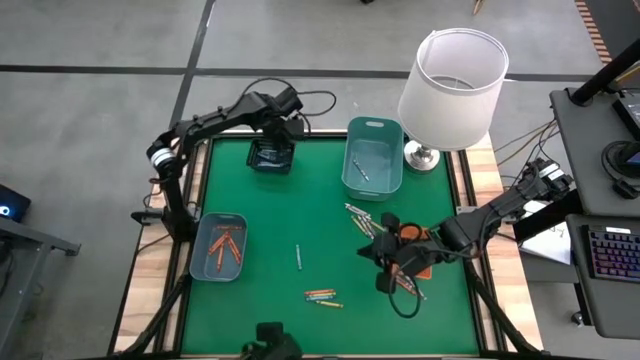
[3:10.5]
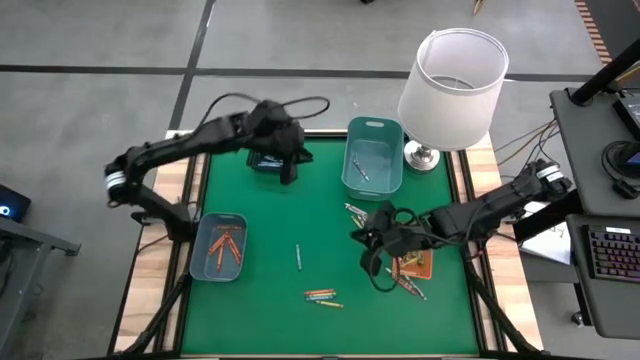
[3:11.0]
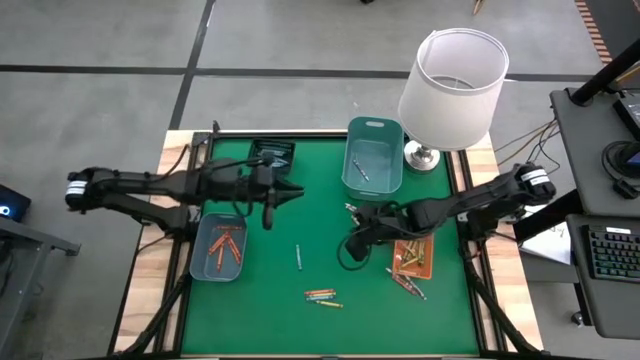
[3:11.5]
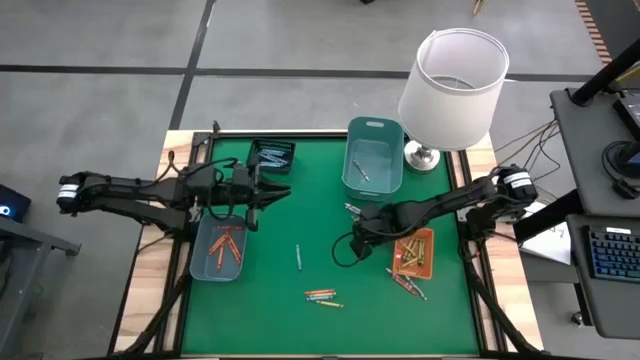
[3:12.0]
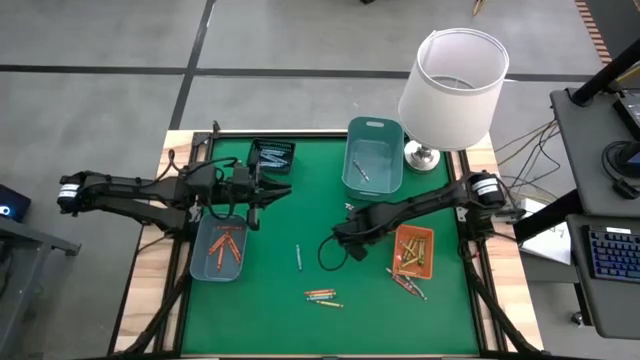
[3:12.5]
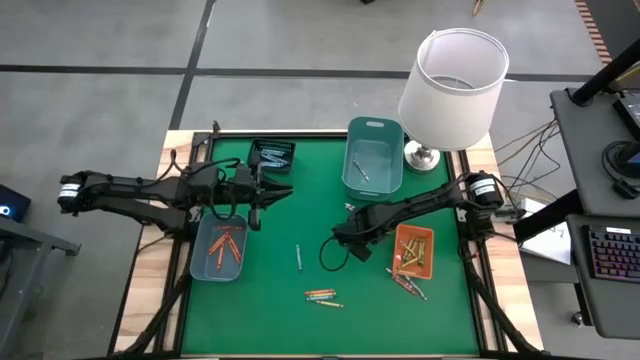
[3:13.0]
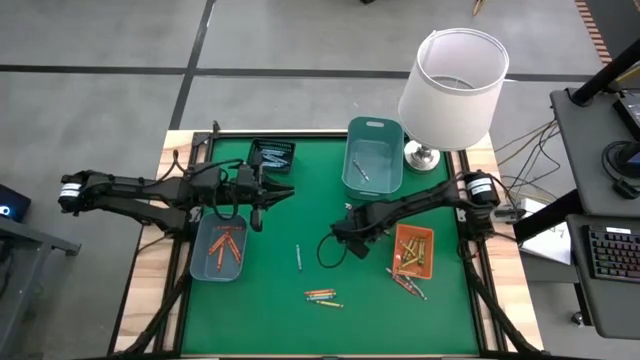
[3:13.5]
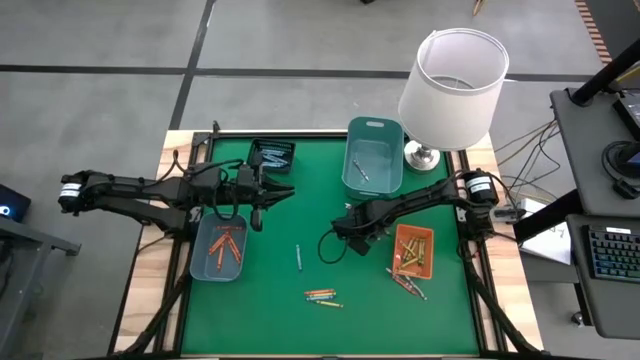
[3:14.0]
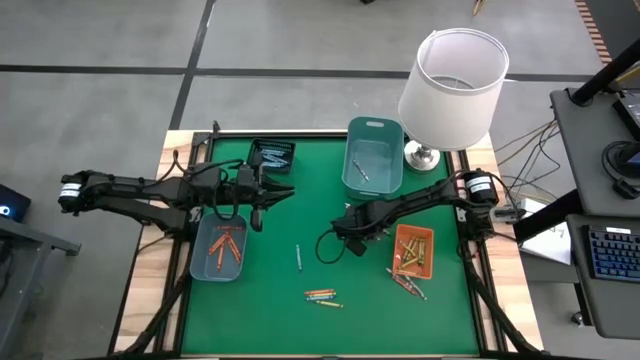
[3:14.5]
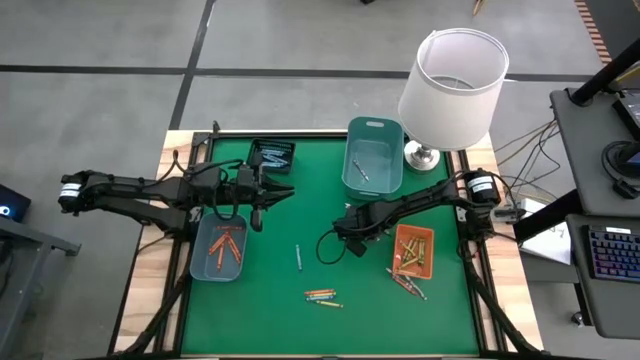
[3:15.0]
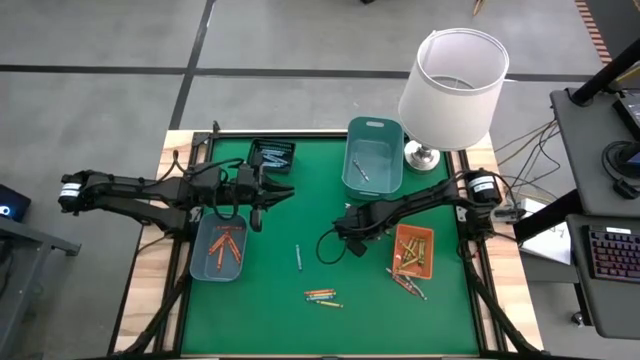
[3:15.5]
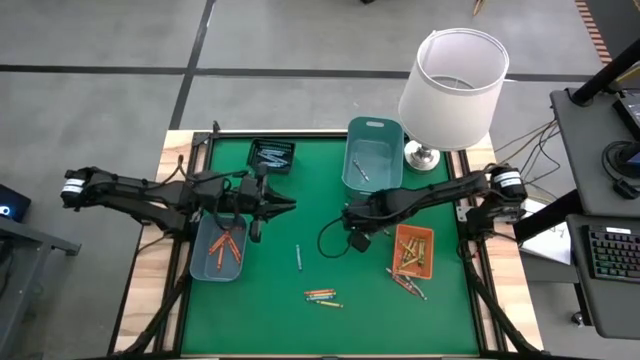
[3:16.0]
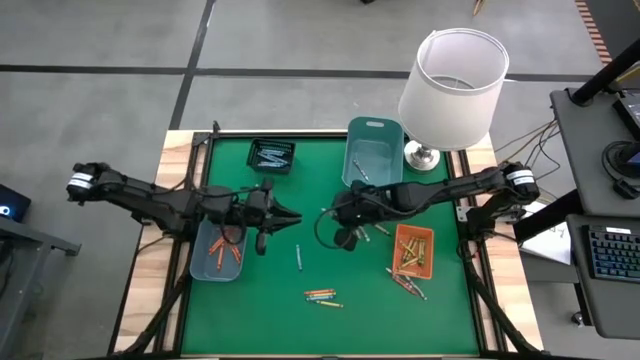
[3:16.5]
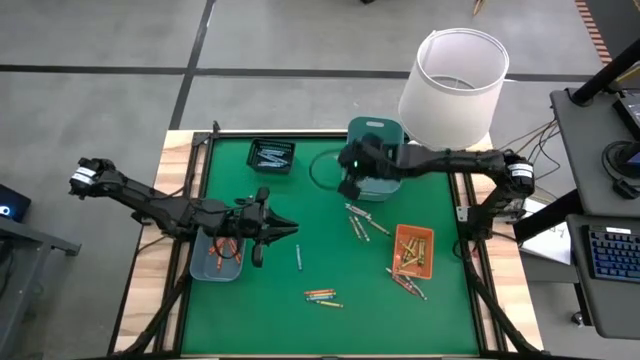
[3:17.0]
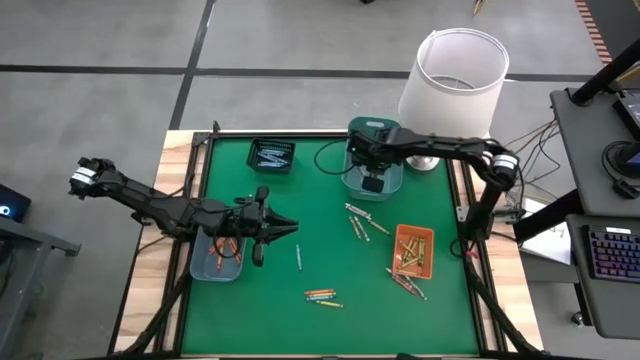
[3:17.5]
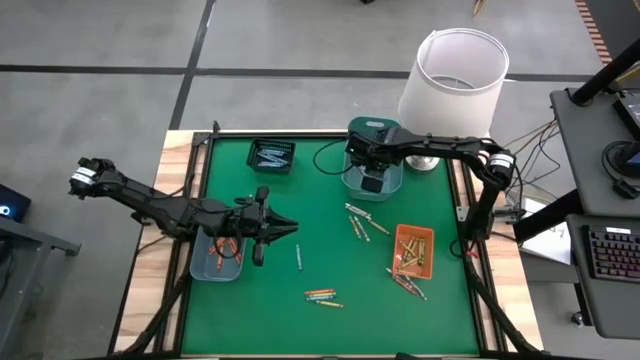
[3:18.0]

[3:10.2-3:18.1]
Task: Sort crayons
Put the white crayon into the green bin

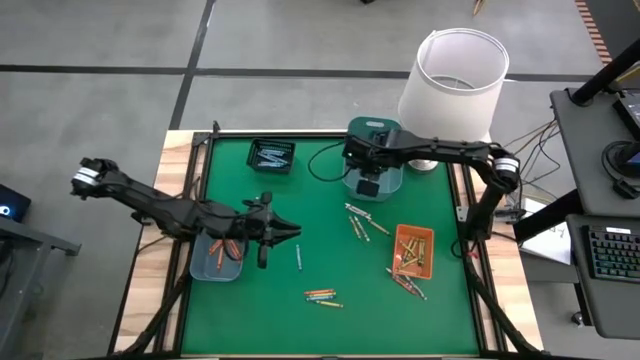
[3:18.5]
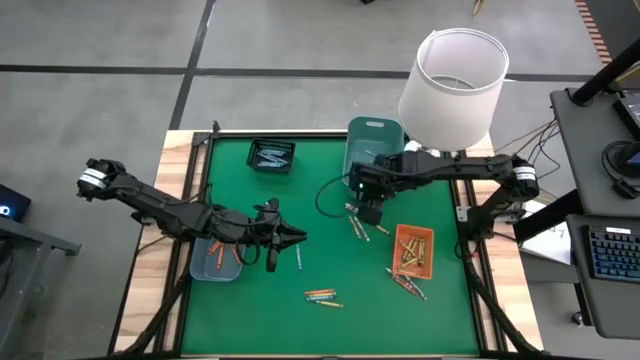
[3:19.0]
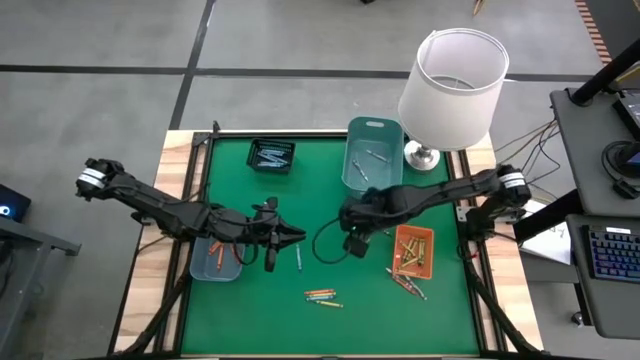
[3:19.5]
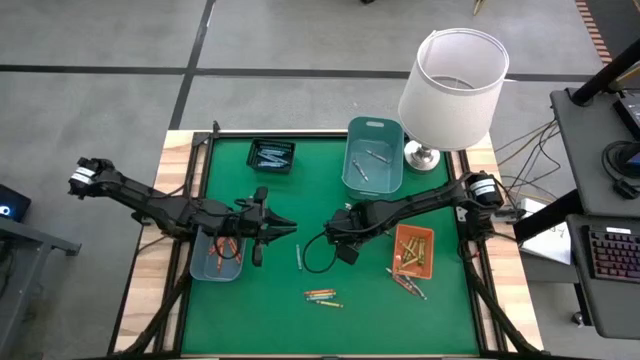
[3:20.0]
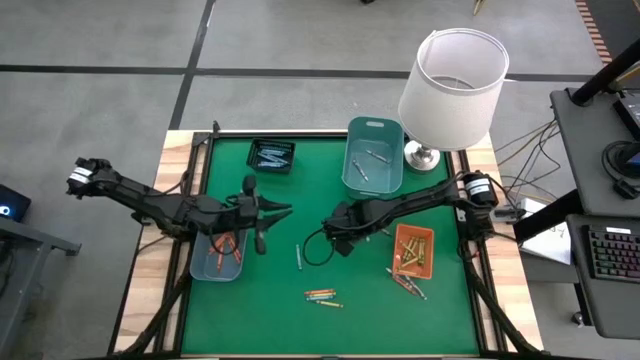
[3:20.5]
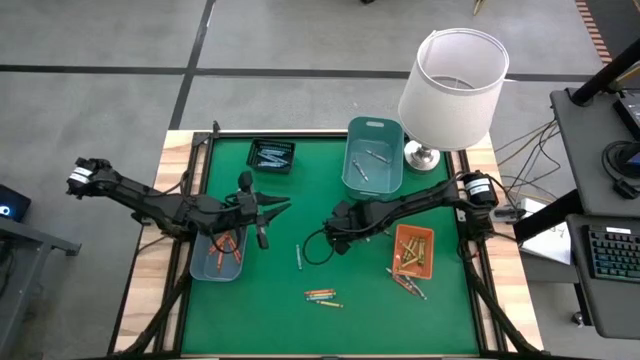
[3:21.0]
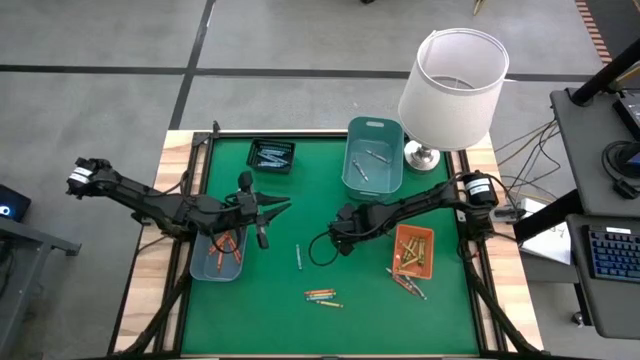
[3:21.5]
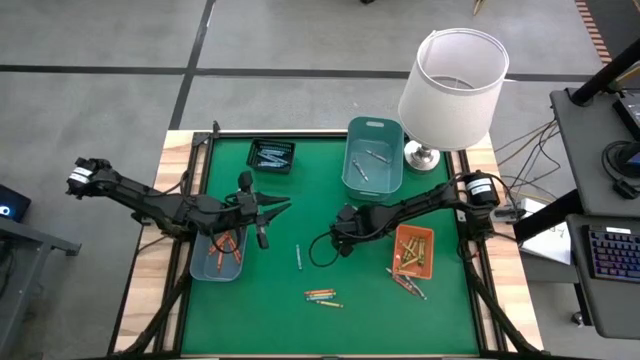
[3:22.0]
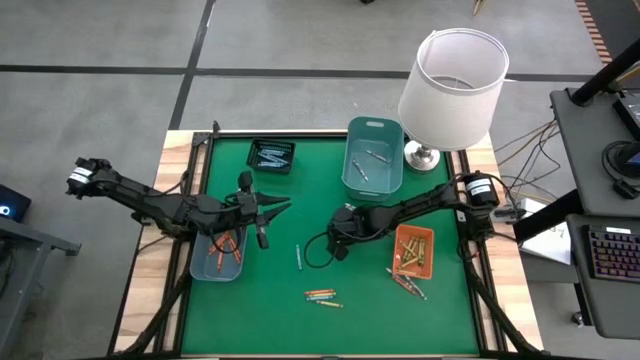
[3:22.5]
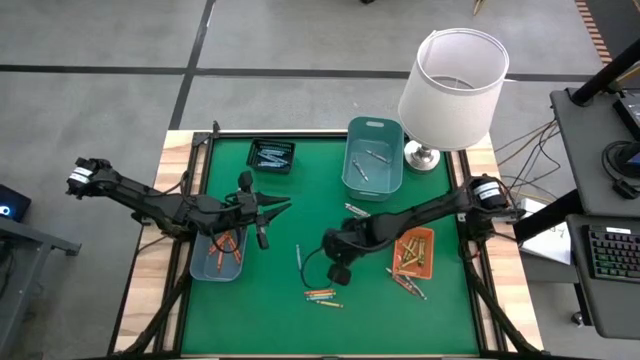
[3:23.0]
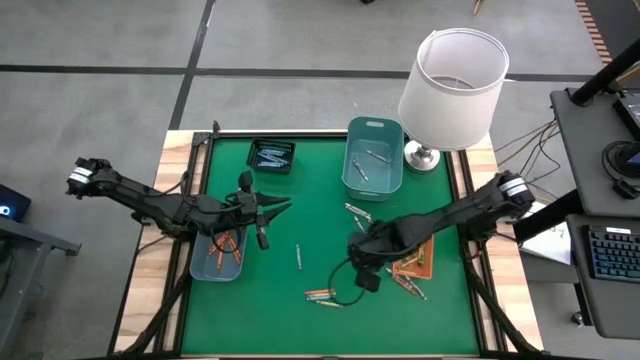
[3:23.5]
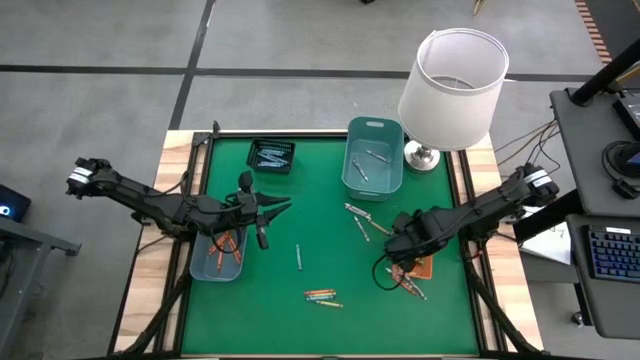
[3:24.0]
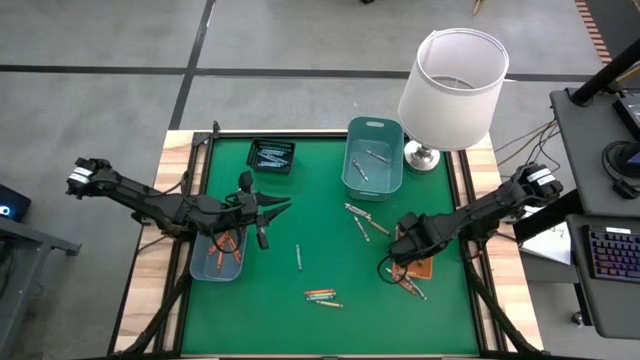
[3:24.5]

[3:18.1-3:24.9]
Put the green crayon into the orange bin

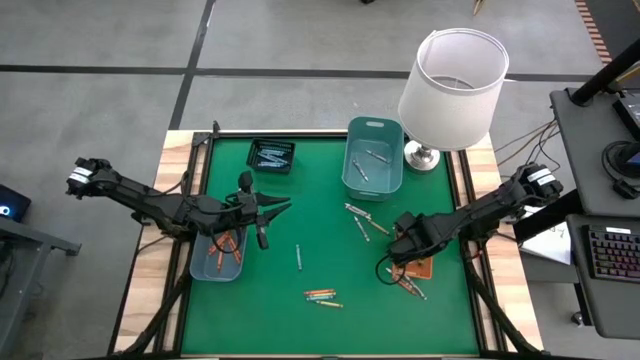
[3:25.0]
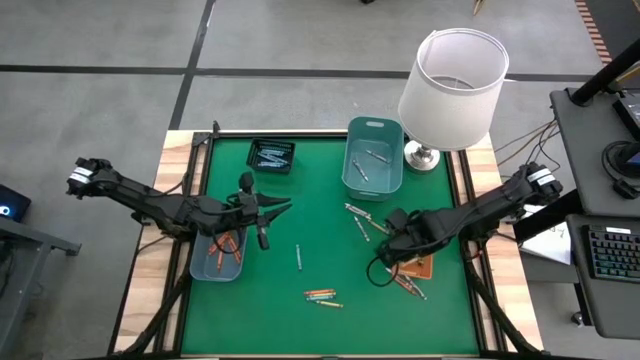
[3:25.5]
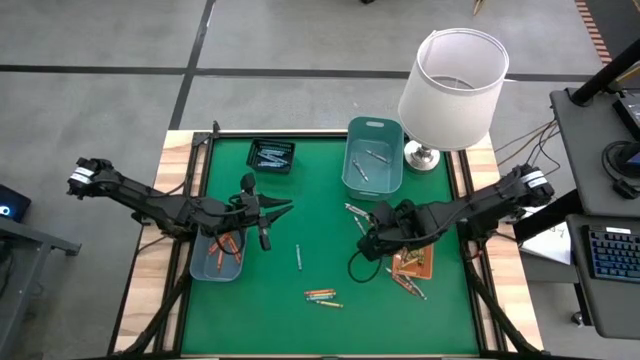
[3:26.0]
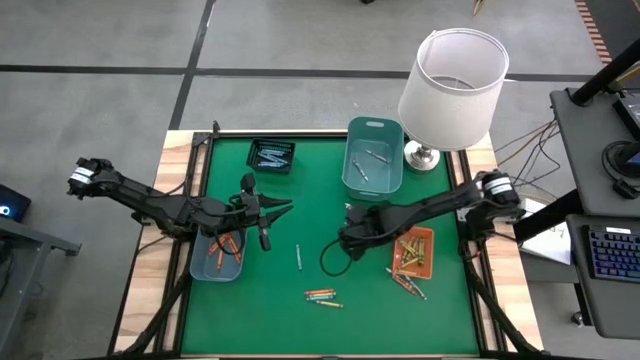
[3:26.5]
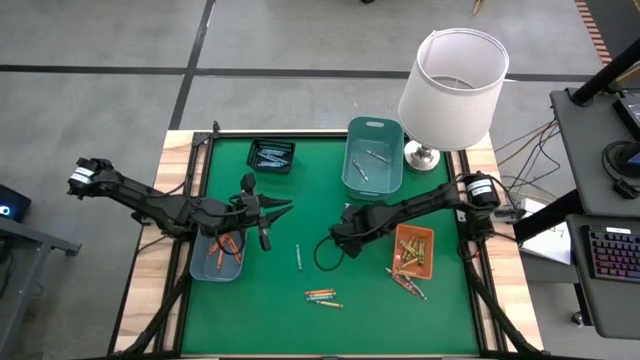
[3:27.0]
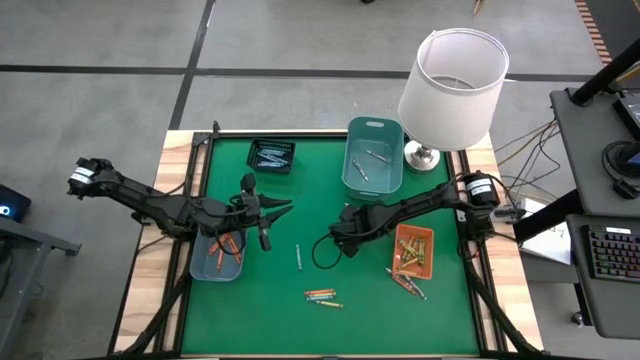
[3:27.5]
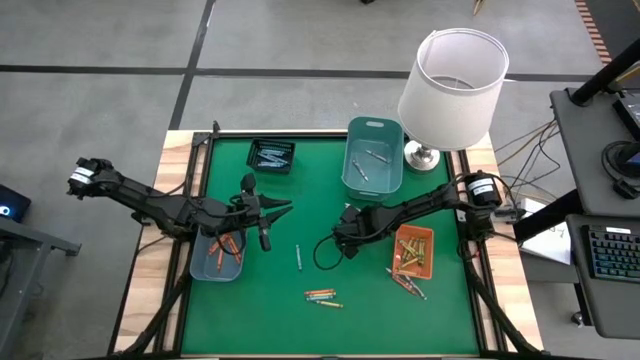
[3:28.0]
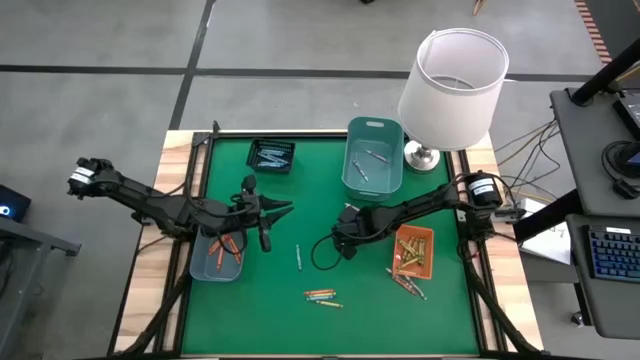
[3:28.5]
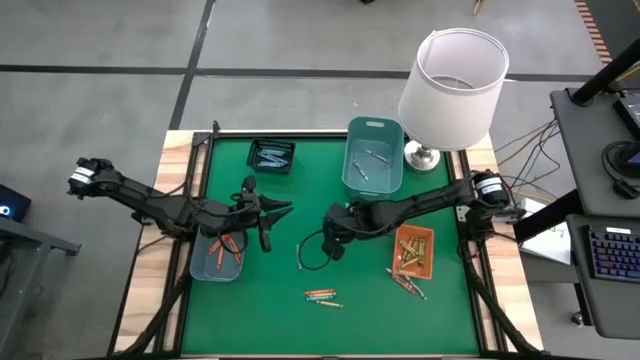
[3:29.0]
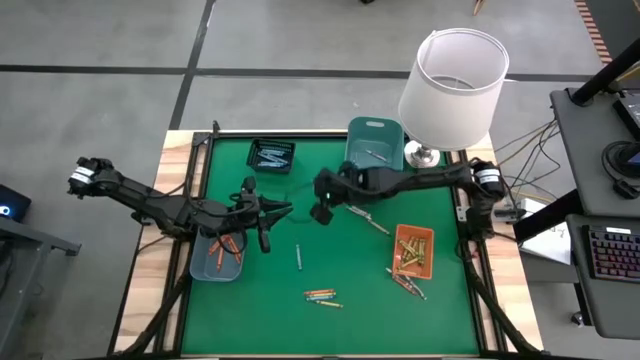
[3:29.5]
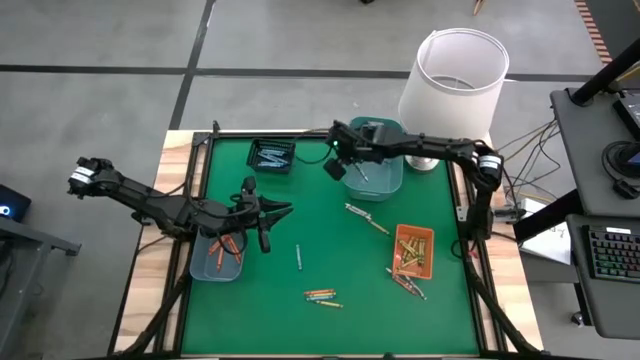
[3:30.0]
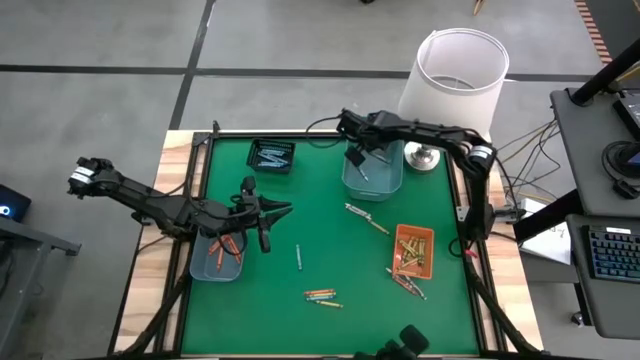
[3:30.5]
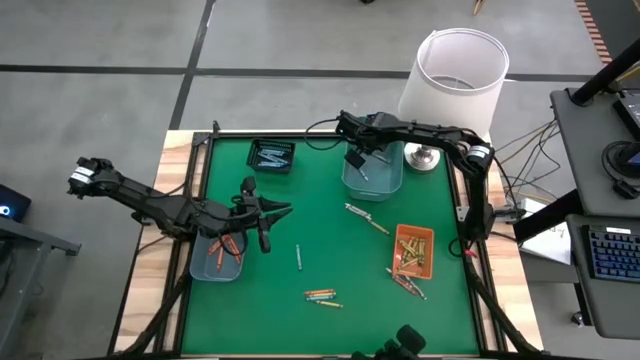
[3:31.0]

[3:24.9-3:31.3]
Put the white crayon into the green bin
